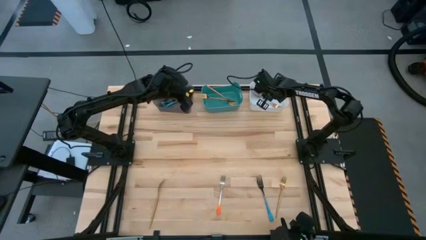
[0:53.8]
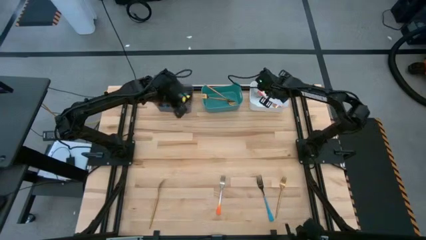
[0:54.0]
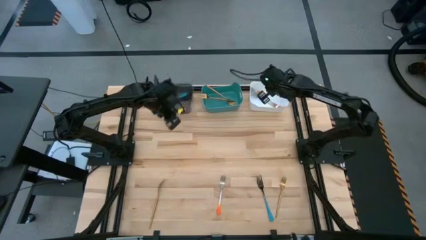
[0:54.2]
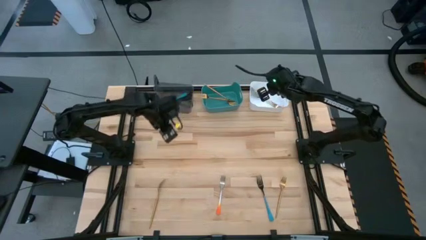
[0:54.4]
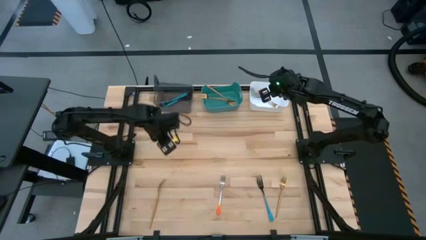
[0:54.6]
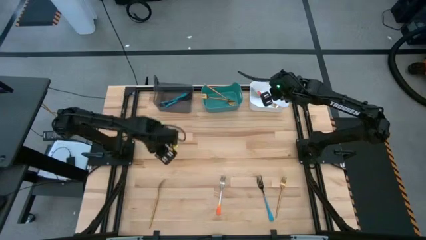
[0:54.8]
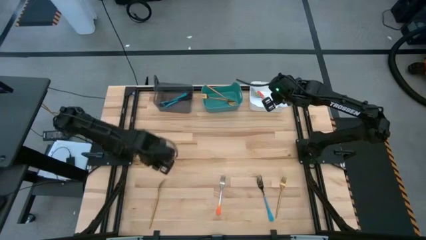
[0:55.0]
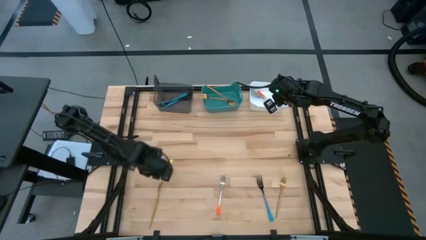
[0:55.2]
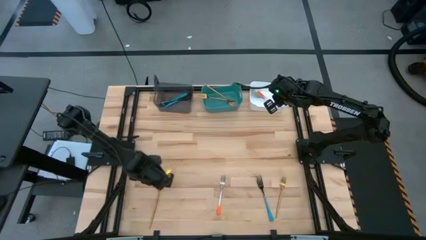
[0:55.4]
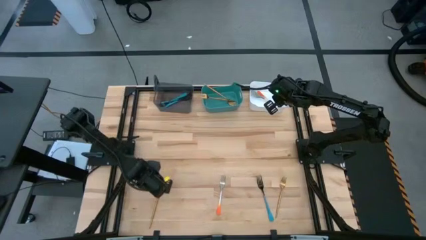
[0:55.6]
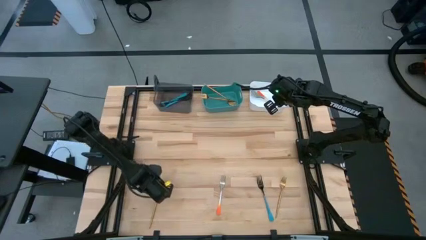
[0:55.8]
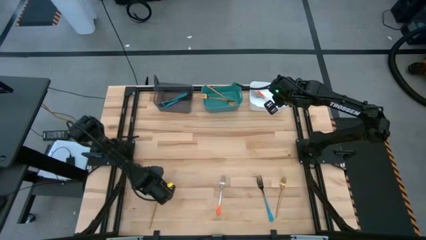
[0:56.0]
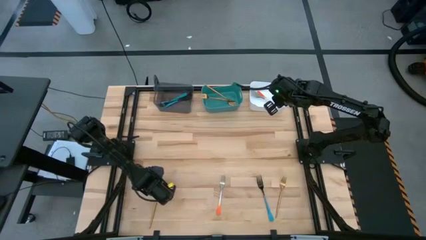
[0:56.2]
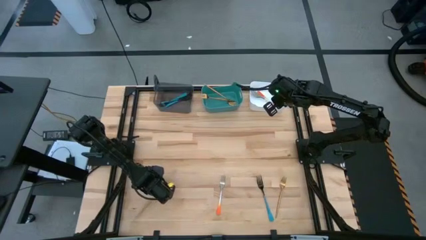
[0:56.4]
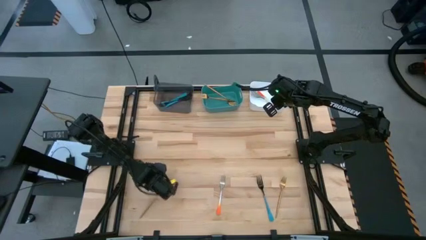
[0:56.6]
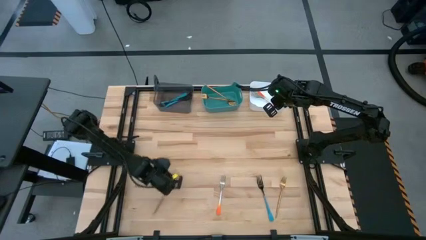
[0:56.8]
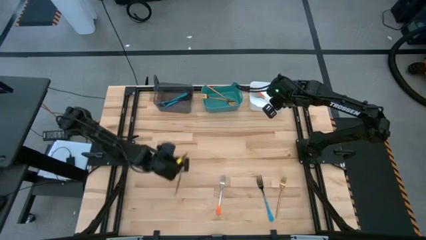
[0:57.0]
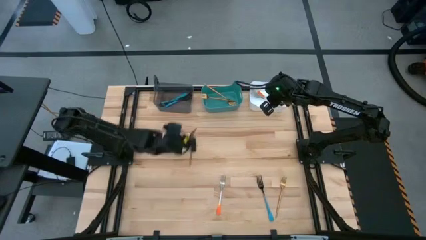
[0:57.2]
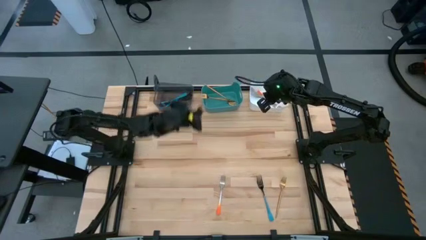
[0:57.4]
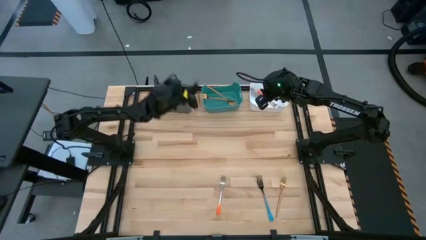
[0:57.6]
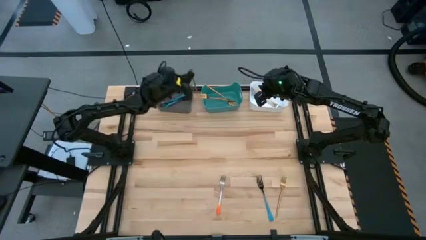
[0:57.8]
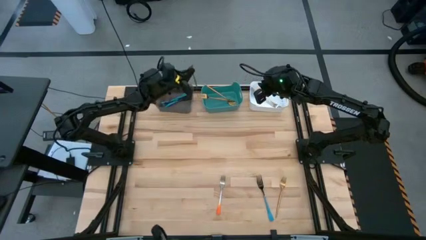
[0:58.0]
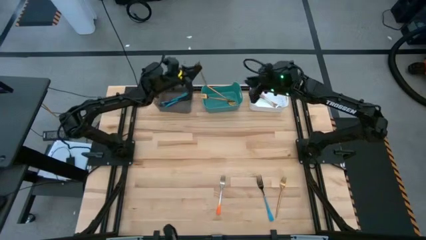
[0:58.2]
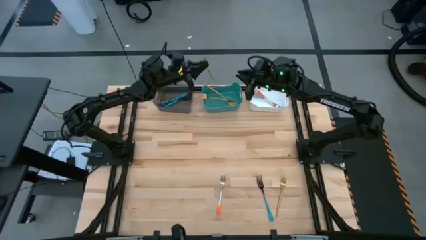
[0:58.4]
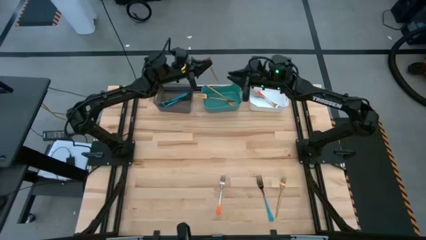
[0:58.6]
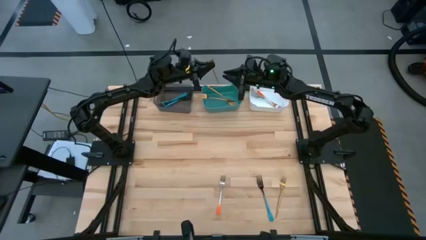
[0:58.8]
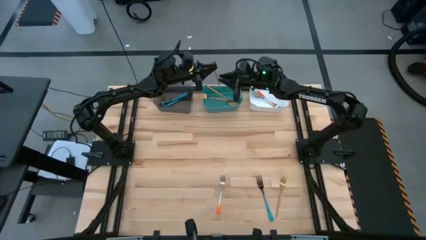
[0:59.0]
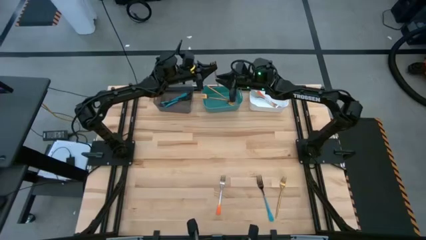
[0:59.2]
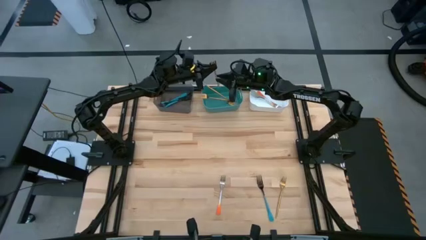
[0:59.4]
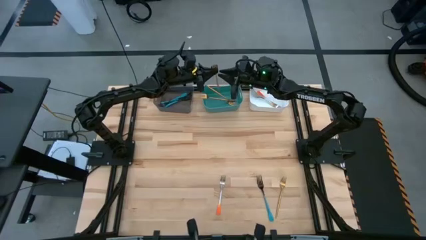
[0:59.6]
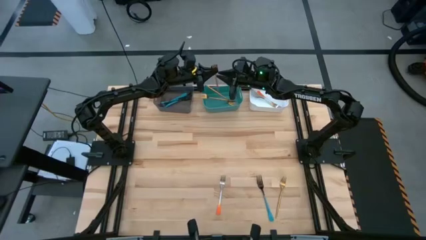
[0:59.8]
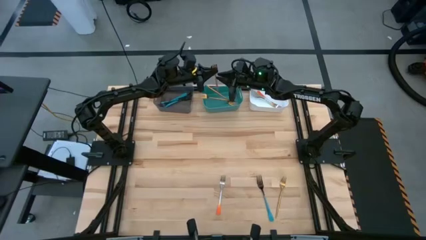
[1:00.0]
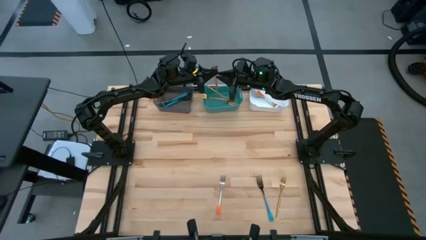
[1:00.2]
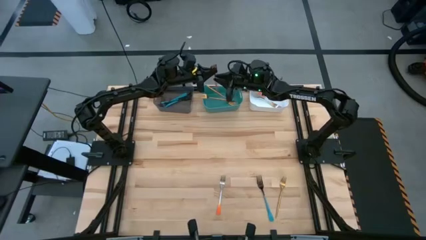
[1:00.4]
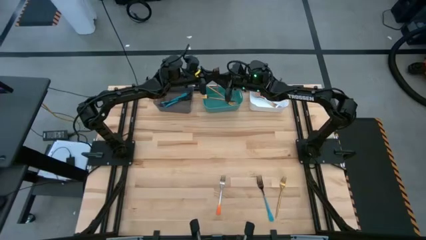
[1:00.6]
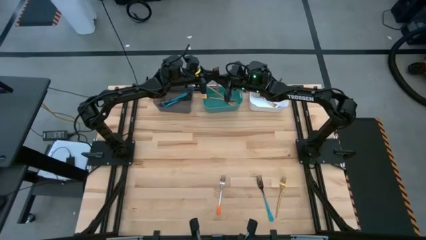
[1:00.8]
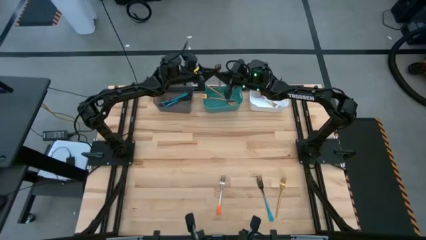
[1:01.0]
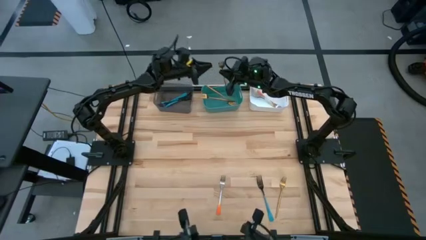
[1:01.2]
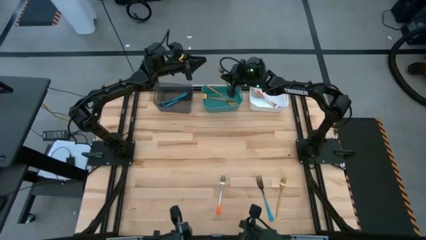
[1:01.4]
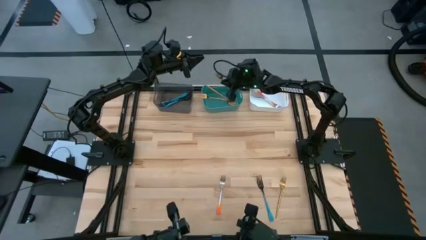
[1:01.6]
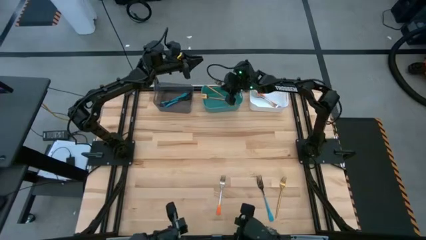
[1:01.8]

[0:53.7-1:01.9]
Task: Sort silverware by color (type)
Put the gold fork into the green bin

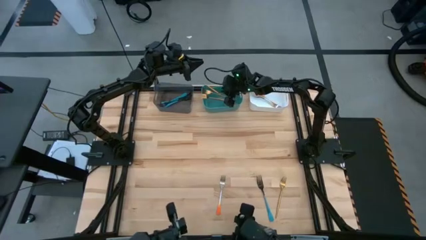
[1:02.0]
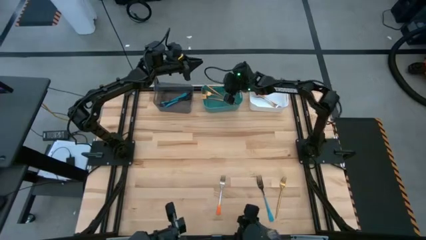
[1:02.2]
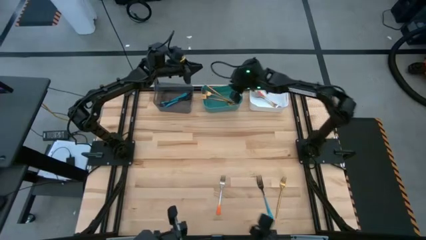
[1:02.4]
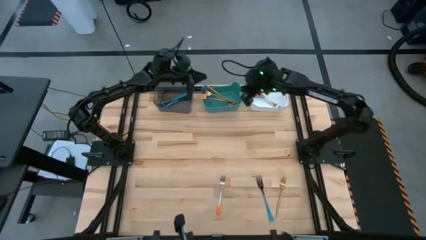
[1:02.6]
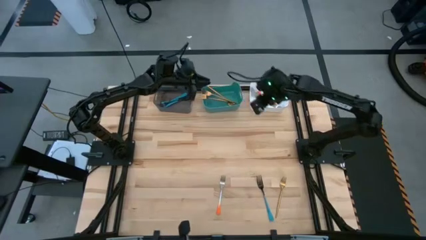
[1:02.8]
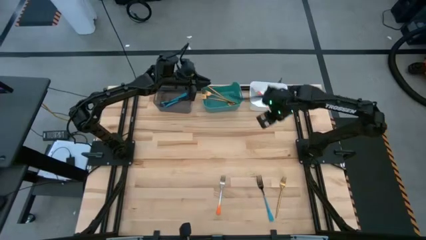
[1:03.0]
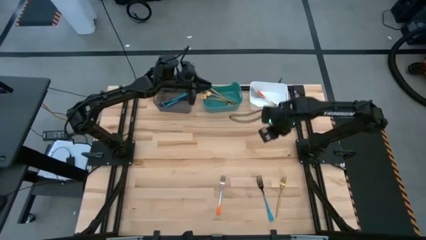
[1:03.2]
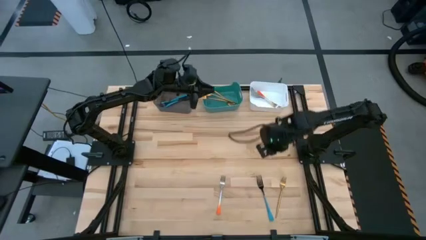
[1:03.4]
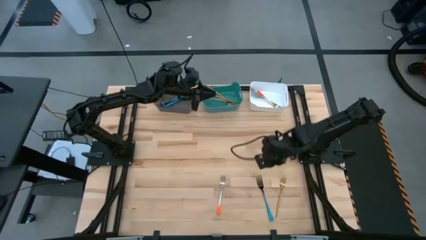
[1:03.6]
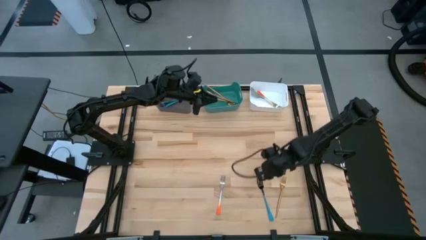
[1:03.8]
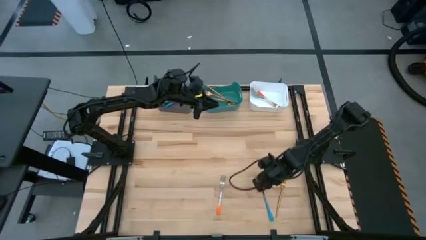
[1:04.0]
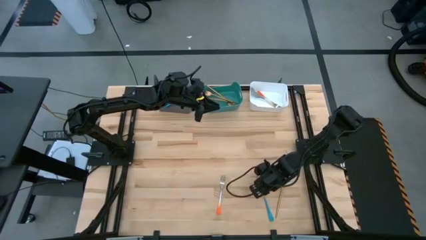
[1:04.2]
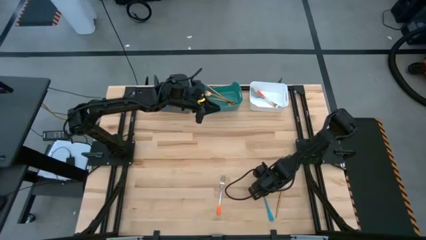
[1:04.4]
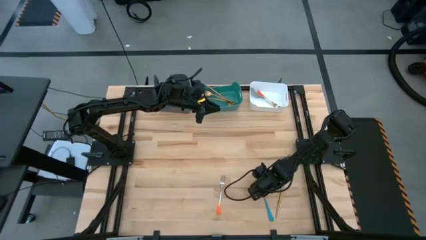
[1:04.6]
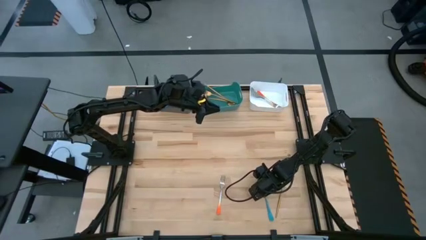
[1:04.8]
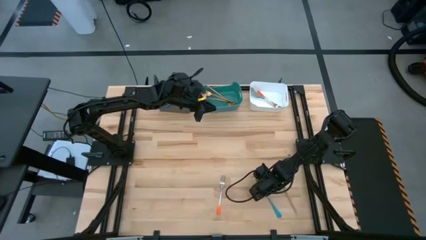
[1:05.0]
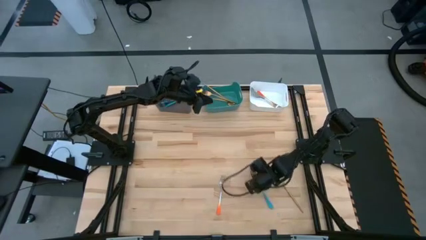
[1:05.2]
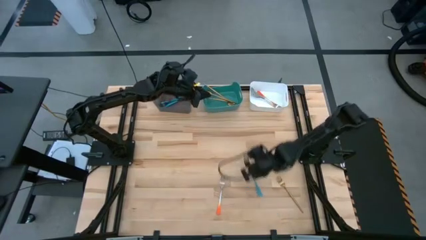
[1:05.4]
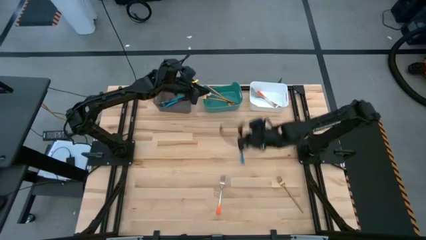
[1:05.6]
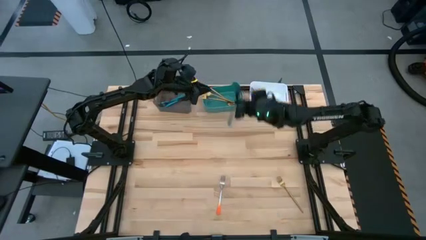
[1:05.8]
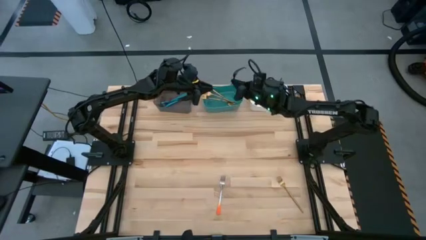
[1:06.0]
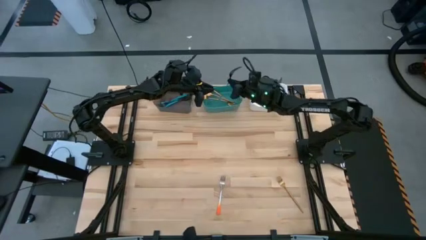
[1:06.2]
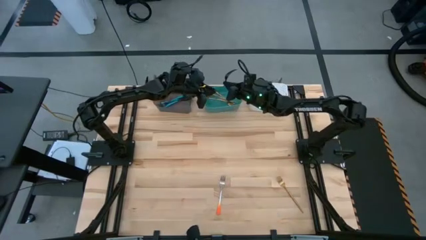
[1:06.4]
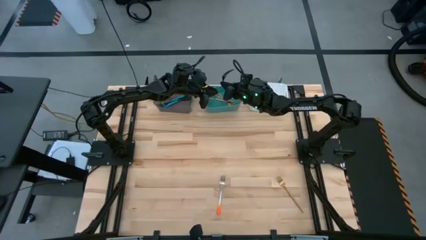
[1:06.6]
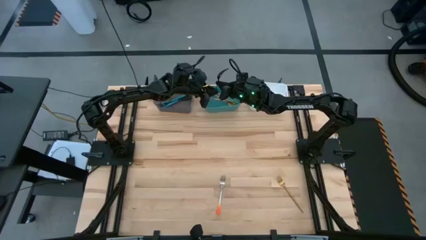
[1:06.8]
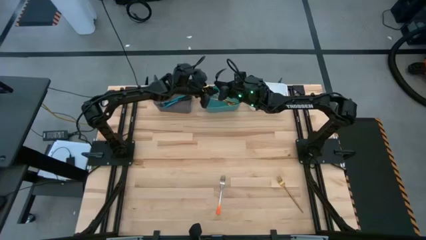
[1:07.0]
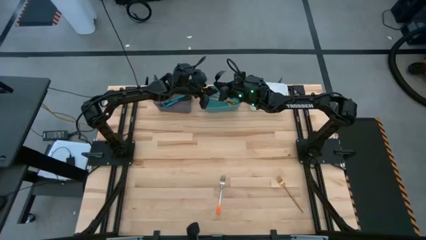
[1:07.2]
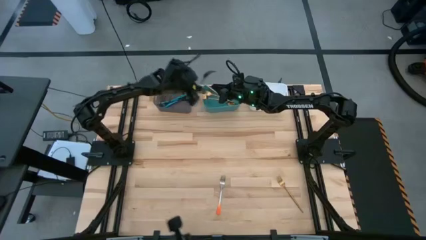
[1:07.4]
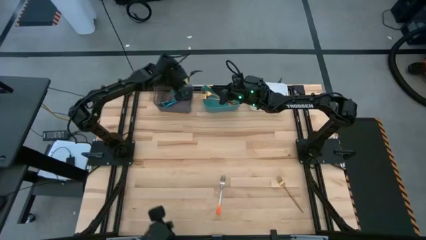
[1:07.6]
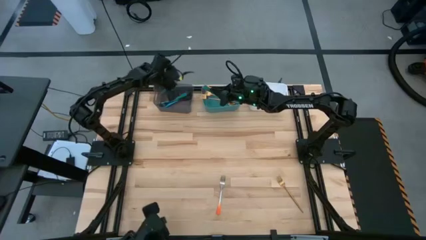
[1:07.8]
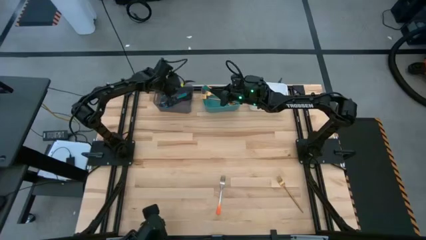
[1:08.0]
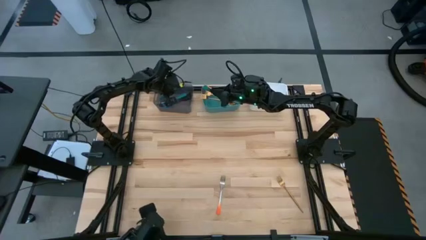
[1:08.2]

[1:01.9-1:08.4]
Put the blue fork into the black bin
